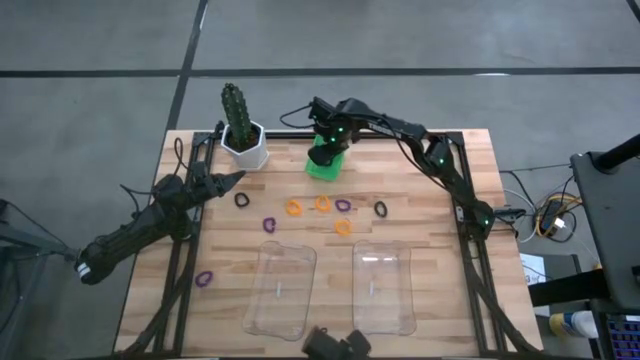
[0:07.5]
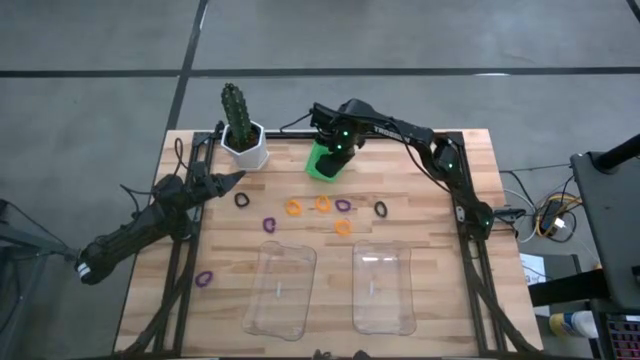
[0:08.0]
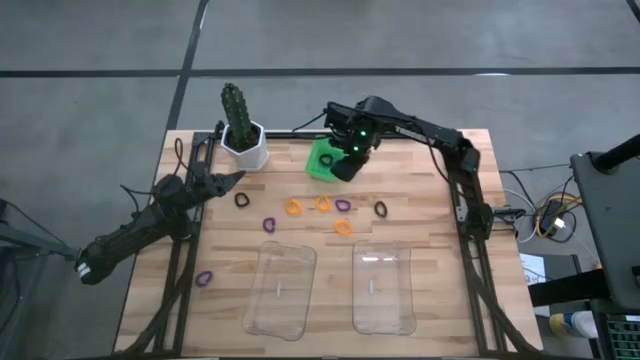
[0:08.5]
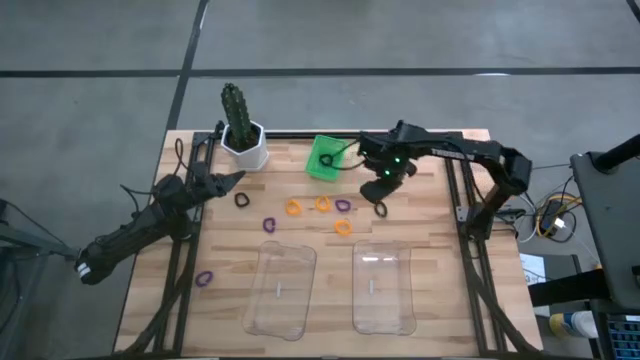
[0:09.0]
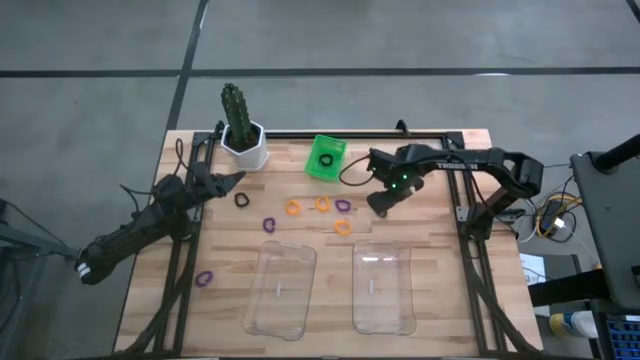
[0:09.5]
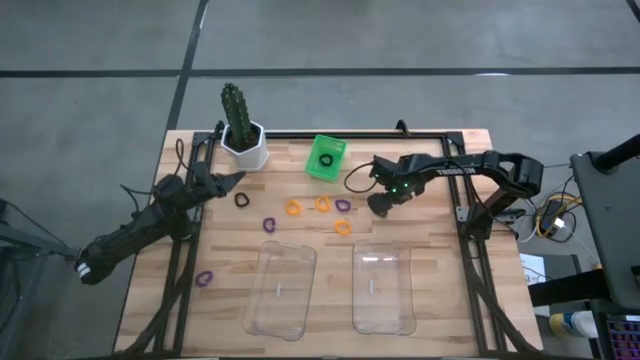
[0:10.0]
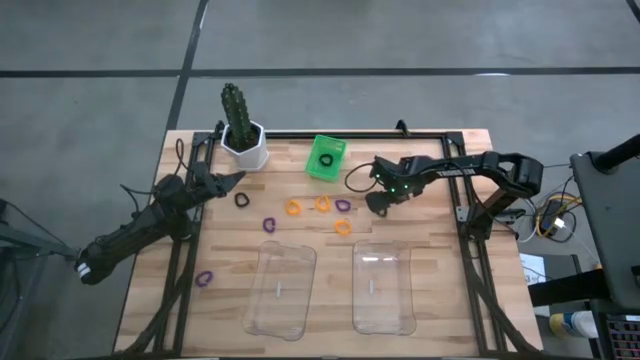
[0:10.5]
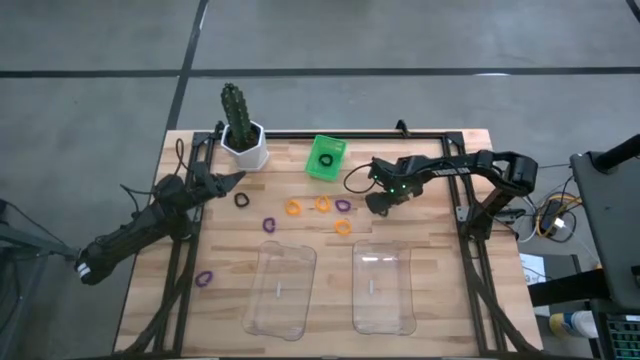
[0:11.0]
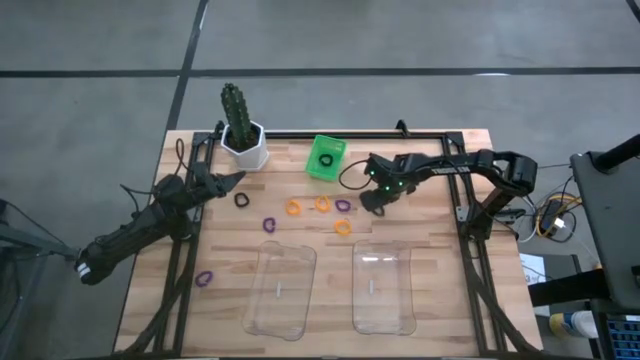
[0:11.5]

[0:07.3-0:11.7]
Task: Sort spring keychains
Put the right black spring keychain into the green bin

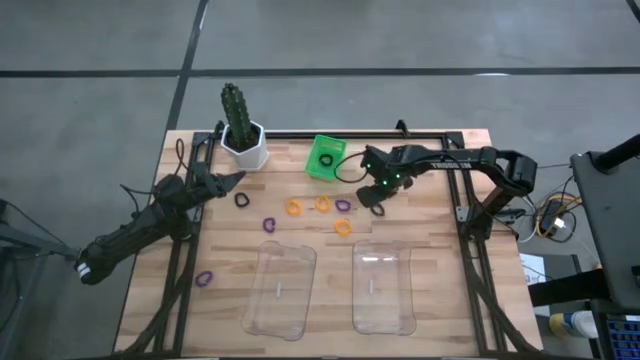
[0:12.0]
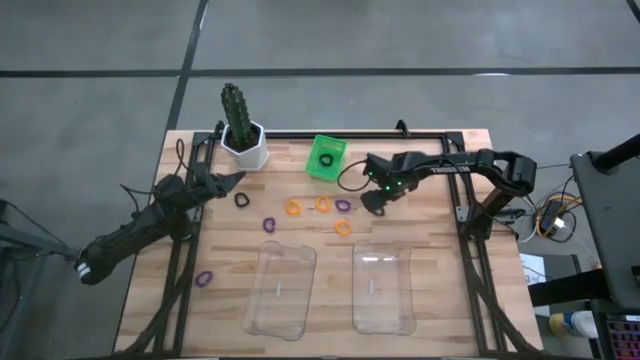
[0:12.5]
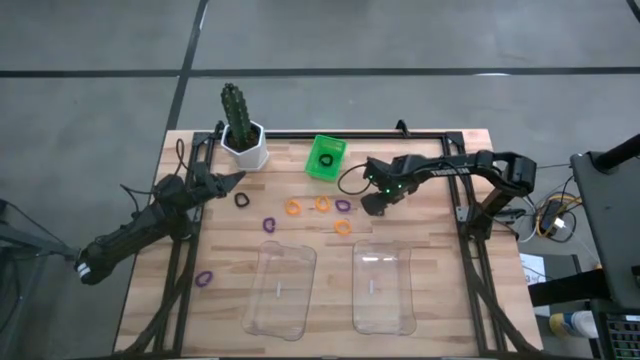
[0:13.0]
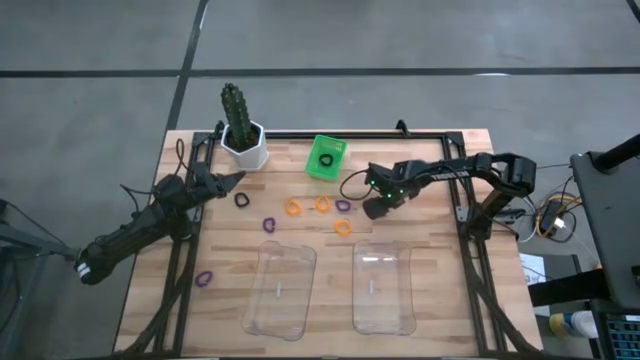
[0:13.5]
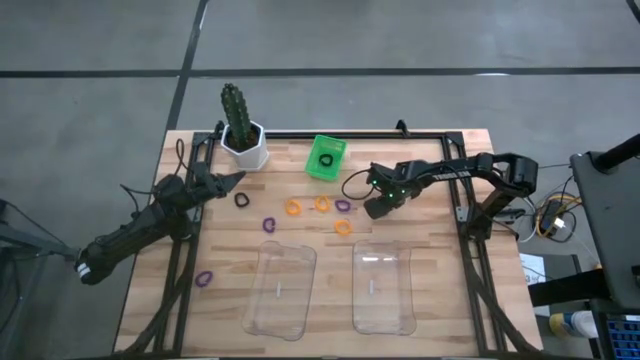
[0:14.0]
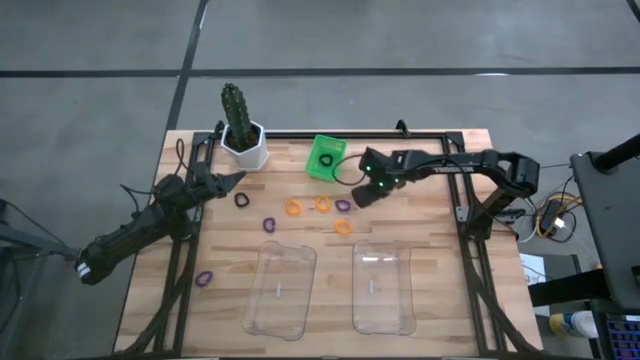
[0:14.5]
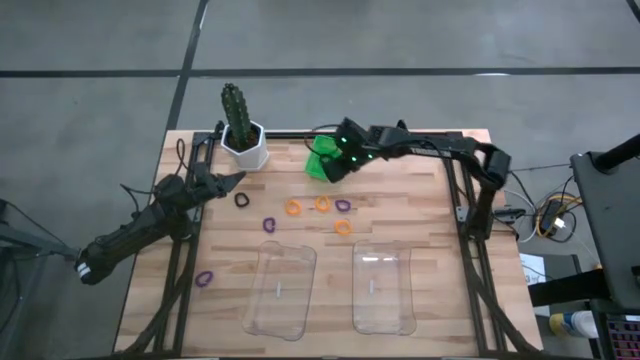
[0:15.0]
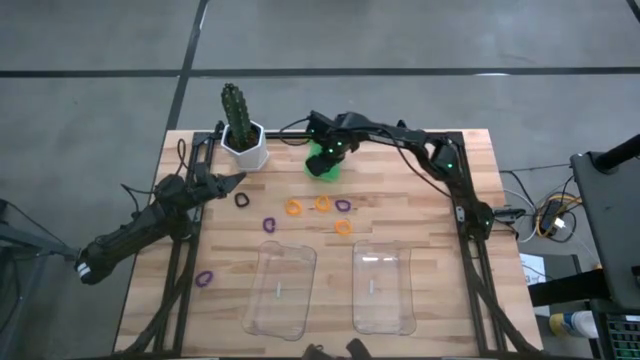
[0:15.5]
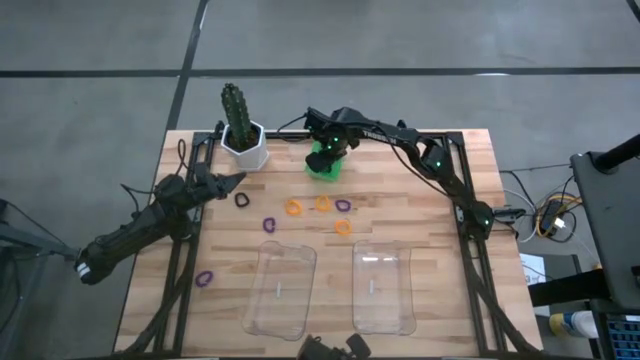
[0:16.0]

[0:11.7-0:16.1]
Put the right black spring keychain into the green bin

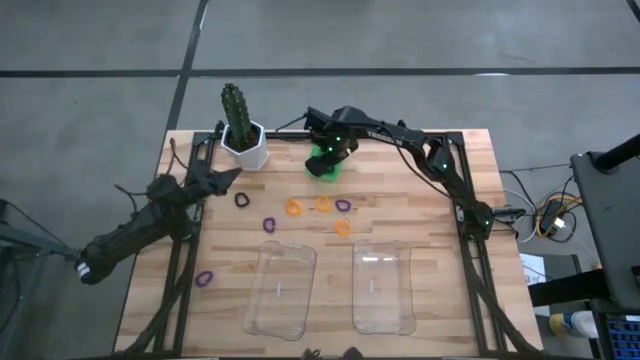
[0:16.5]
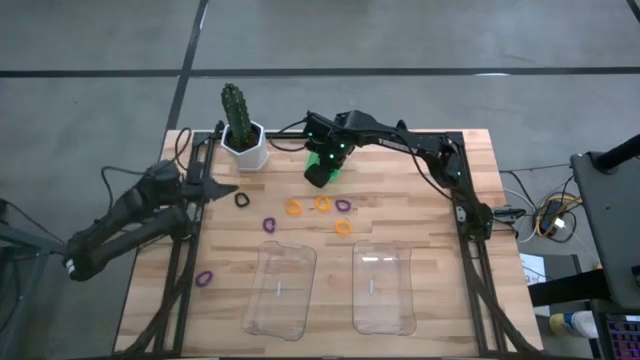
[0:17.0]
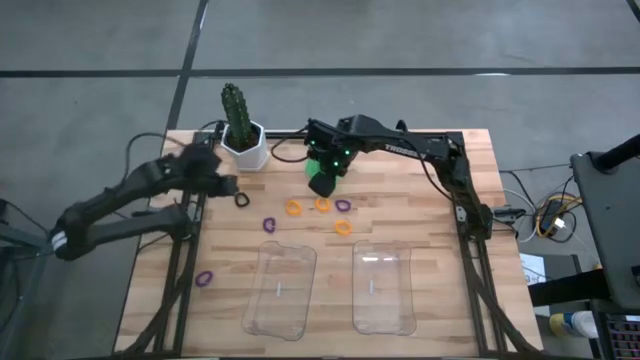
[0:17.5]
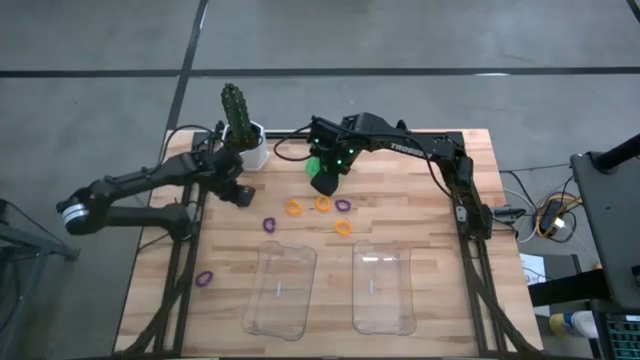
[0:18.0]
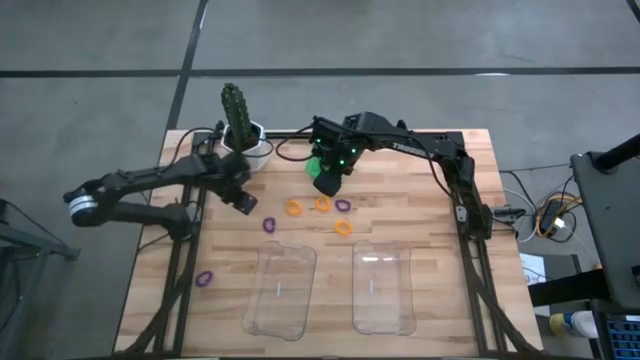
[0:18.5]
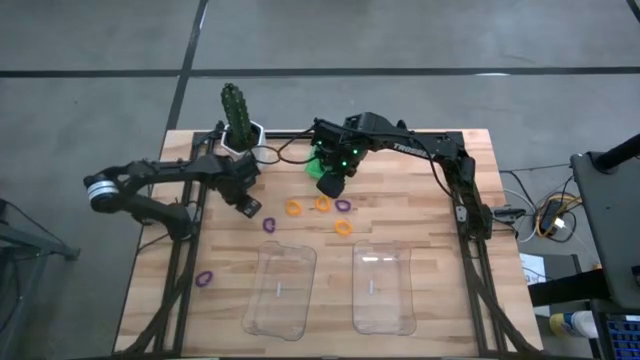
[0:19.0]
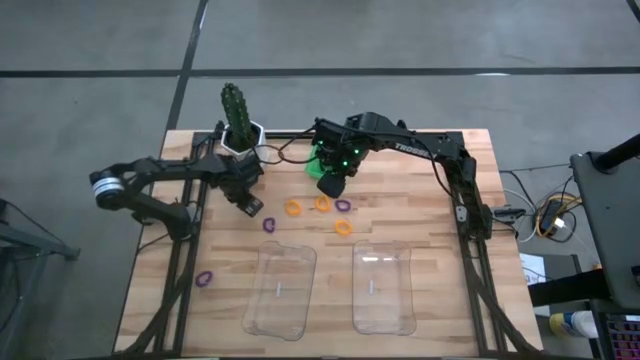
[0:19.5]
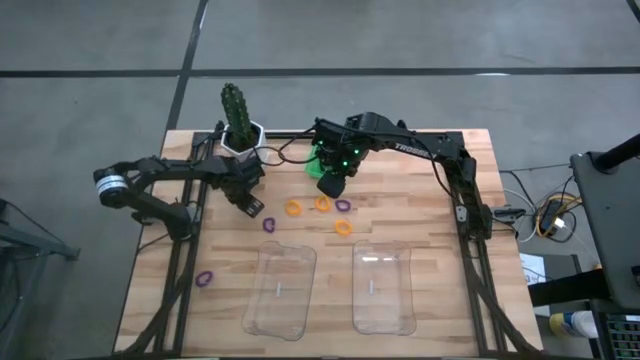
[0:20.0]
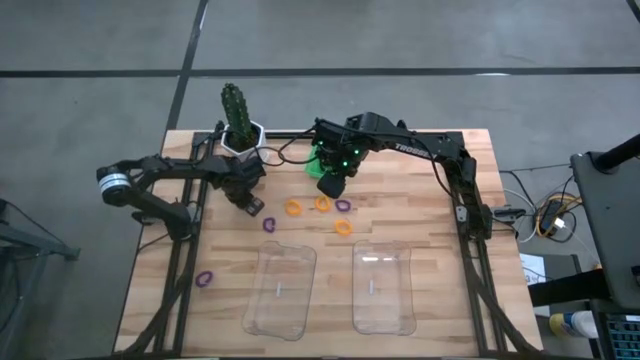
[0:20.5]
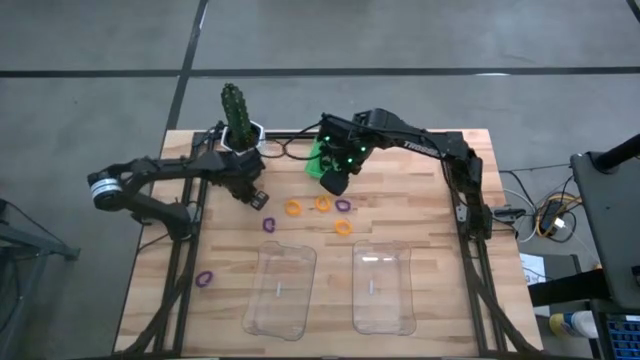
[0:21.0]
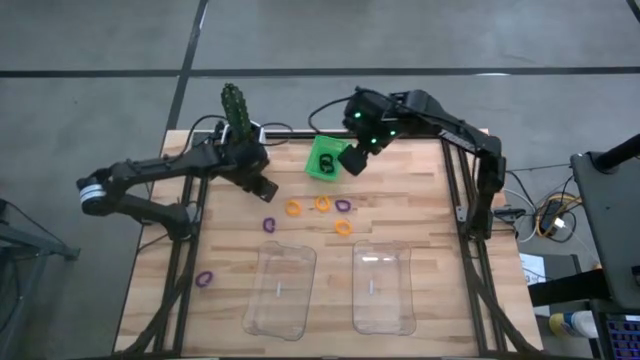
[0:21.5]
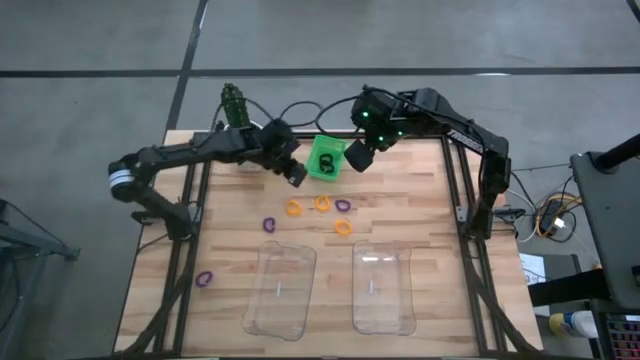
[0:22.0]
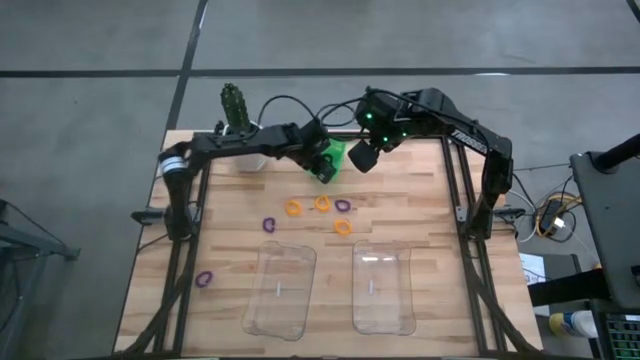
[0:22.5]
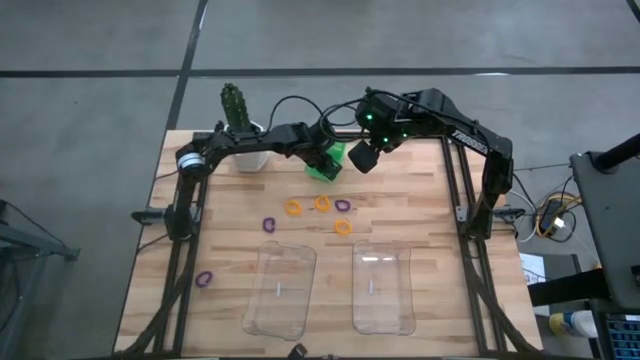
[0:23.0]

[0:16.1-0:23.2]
Put the black spring keychain into the green bin

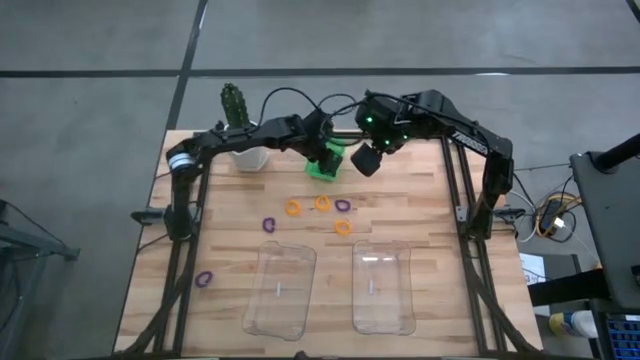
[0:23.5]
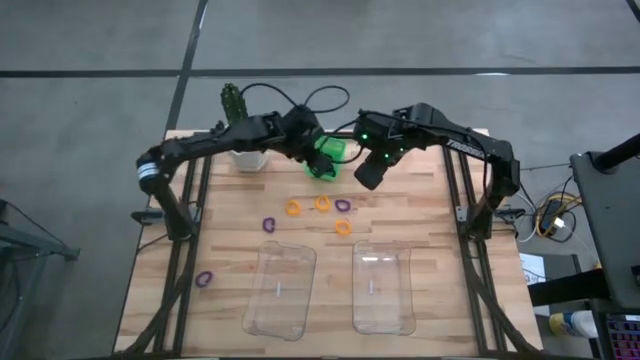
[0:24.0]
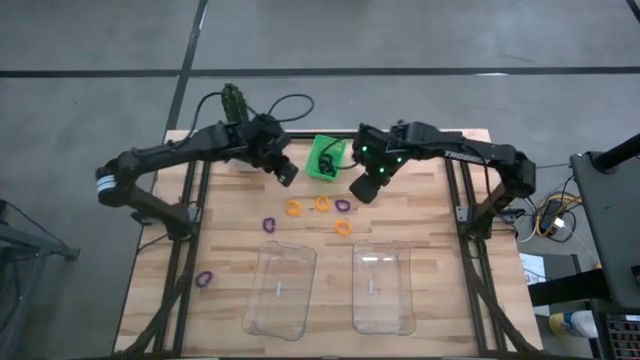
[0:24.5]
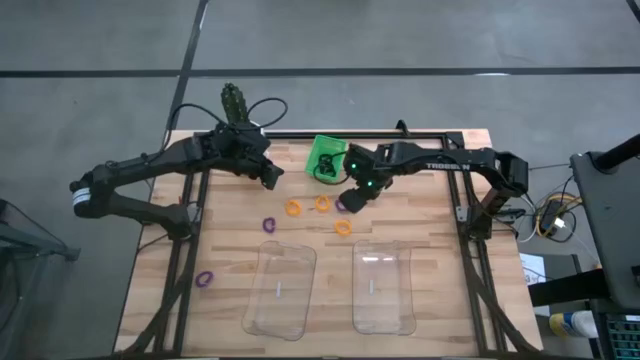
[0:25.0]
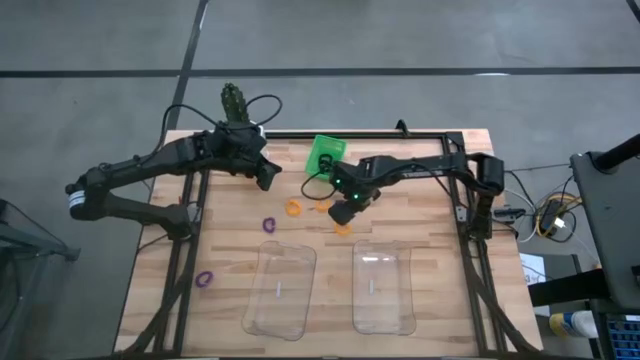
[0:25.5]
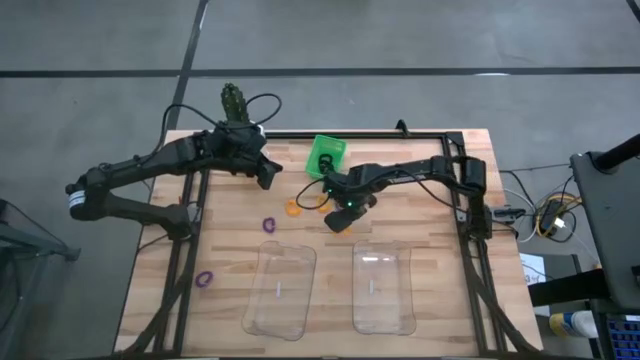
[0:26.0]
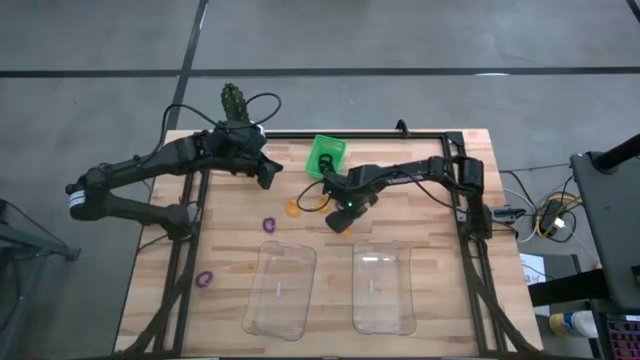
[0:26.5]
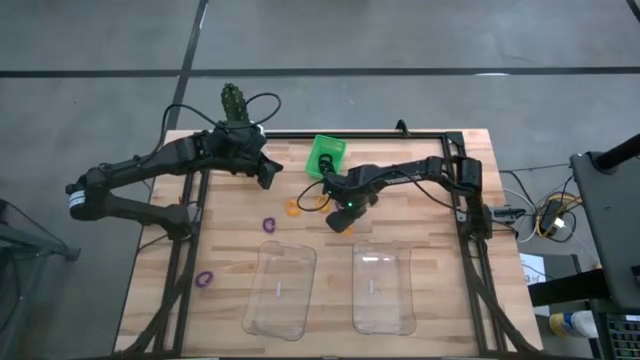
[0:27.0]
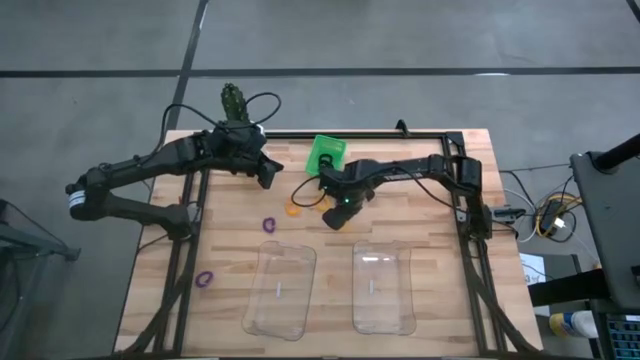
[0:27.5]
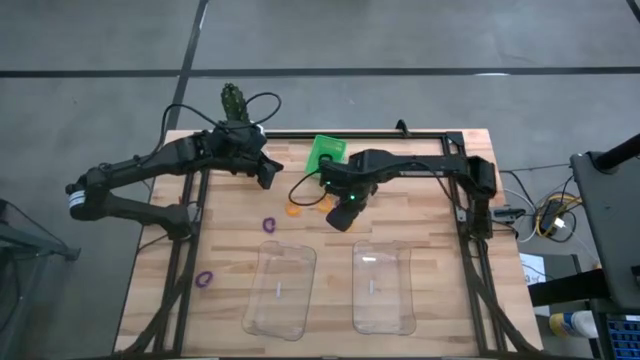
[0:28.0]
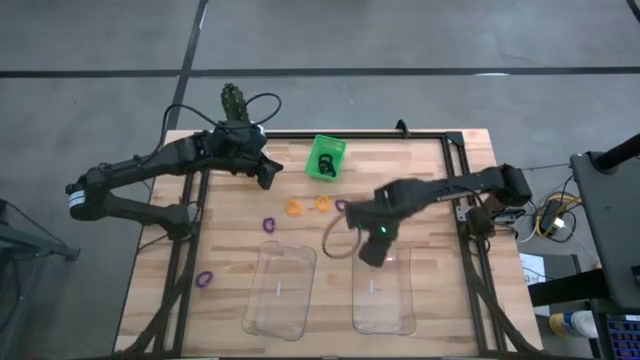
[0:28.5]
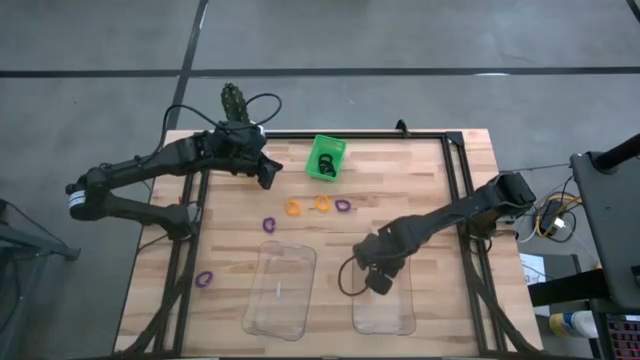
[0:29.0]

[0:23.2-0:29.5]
Put the bottom yellow spring keychain into the right transparent bin
